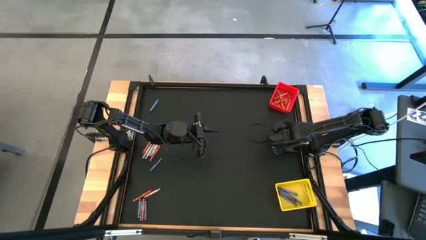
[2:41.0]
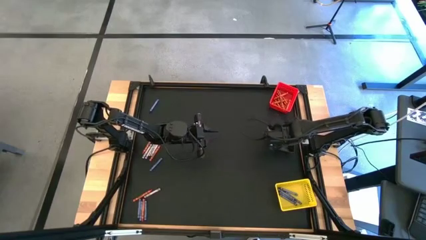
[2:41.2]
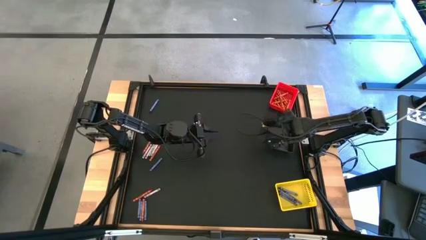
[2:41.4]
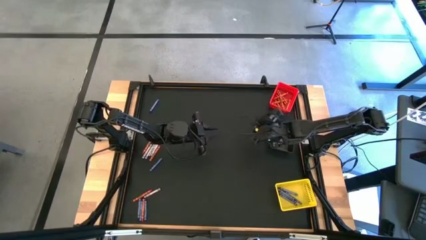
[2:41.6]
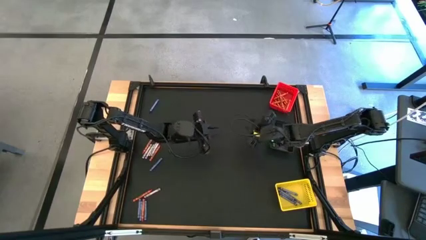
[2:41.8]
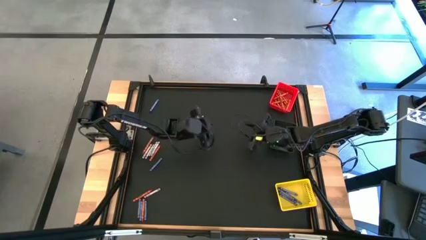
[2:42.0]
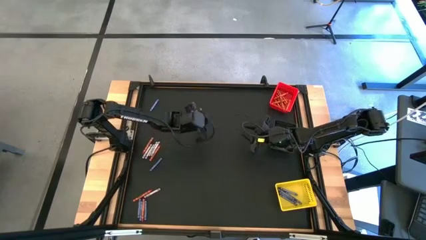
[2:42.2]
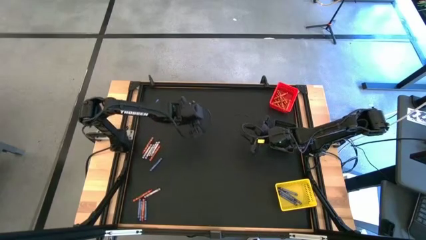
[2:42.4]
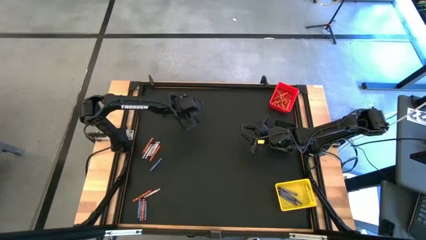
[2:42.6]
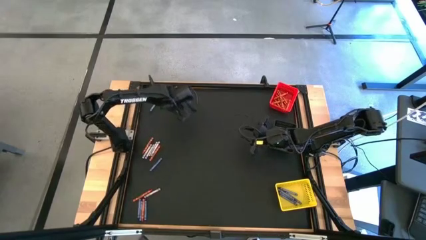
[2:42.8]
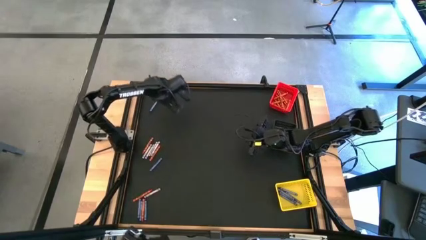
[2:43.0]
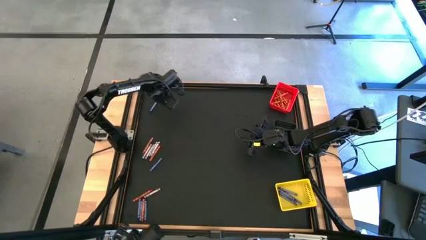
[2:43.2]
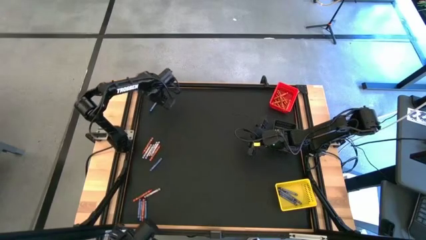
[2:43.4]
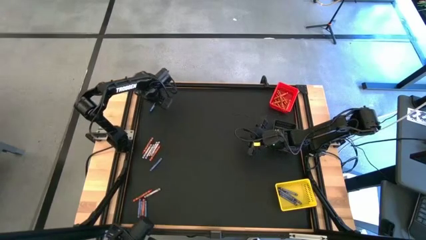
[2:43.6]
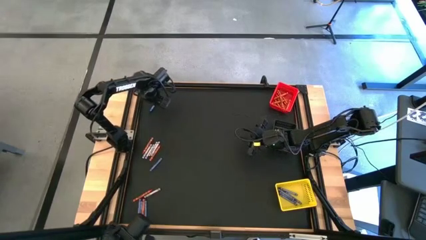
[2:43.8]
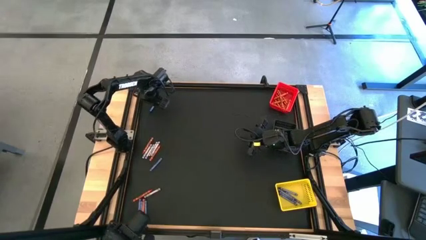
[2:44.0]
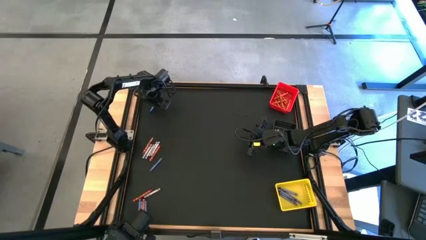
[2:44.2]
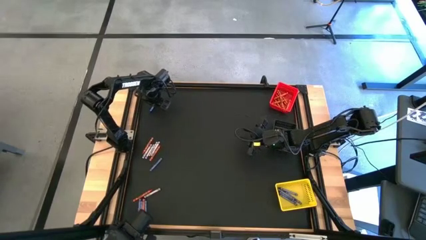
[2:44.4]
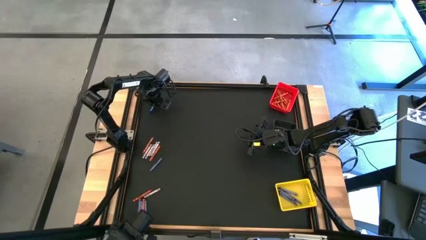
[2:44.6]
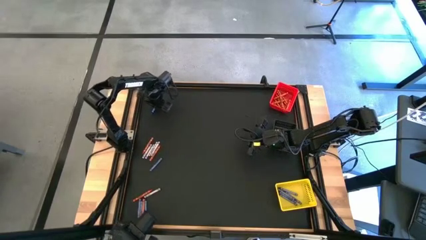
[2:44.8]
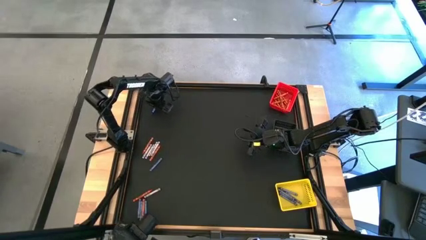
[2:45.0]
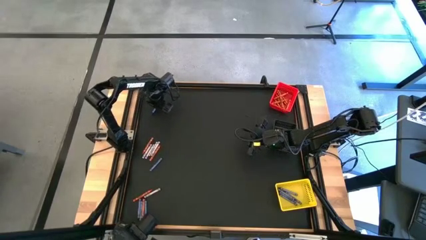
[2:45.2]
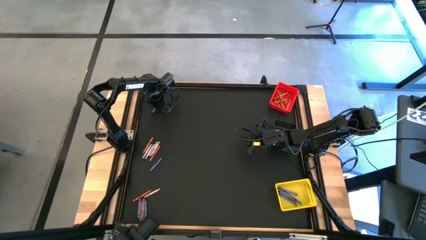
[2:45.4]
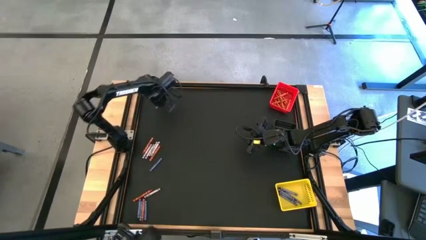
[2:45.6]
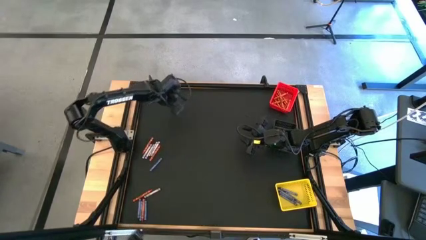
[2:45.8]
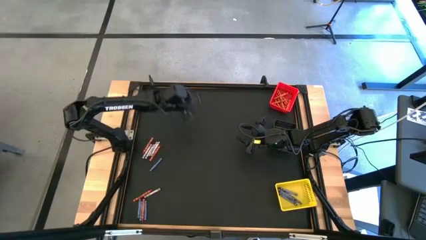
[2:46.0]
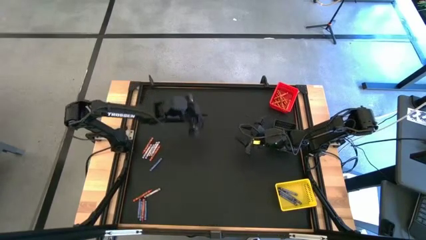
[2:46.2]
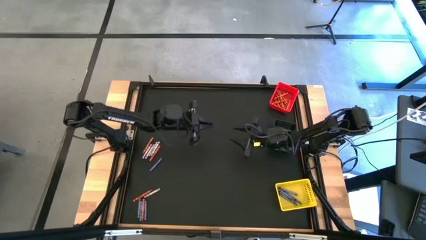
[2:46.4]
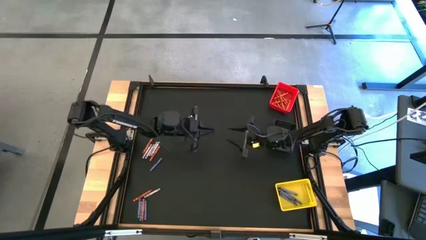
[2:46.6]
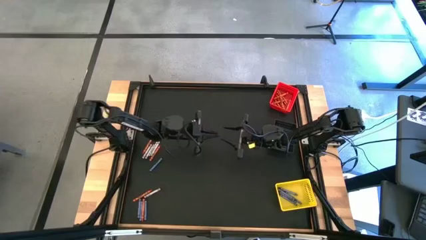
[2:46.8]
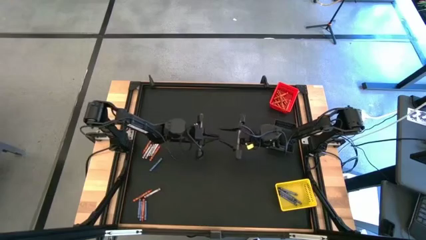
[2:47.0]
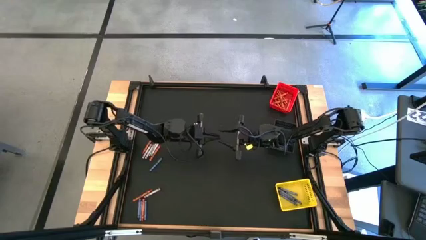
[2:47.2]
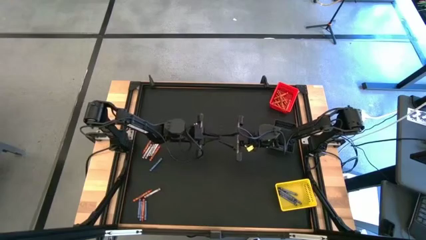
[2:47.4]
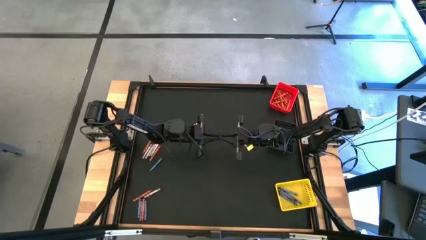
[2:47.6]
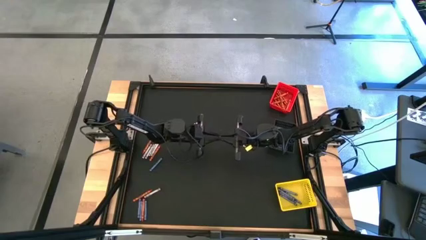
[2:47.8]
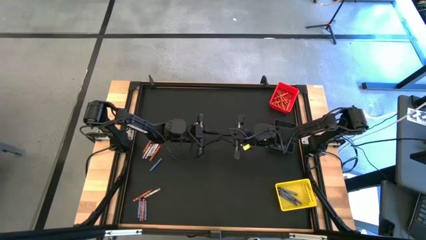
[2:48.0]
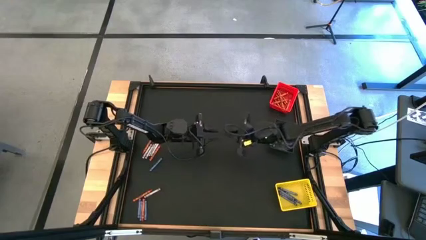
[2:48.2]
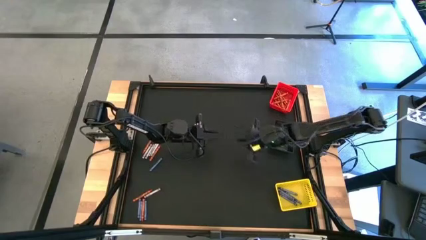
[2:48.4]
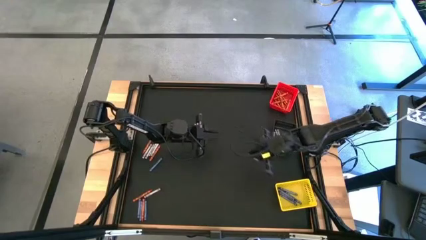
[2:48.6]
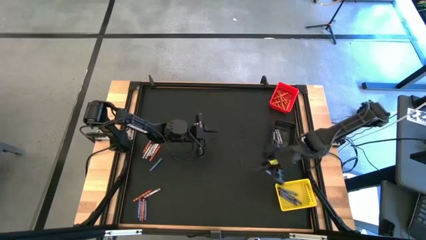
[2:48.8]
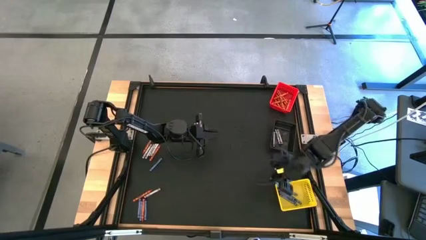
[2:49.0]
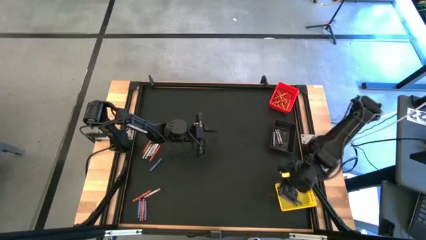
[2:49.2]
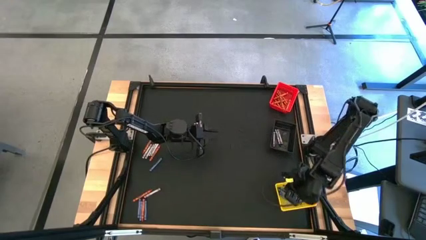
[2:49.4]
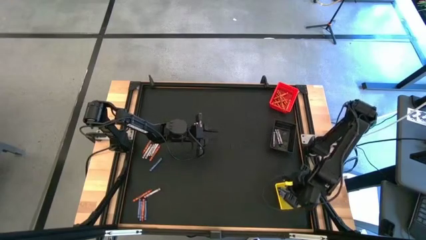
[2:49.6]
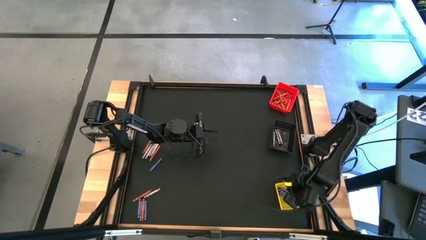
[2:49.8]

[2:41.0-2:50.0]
Task: Sort crayons
Put the blue crayon into the yellow bin

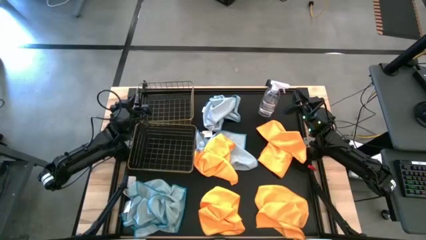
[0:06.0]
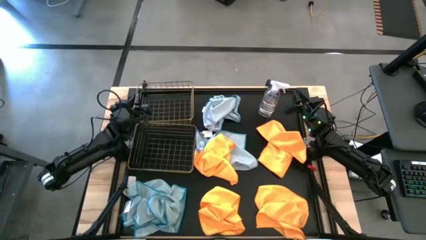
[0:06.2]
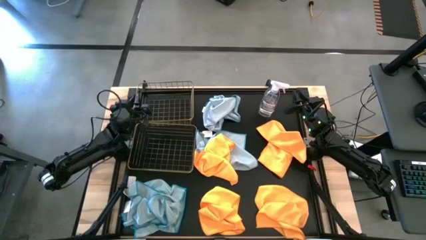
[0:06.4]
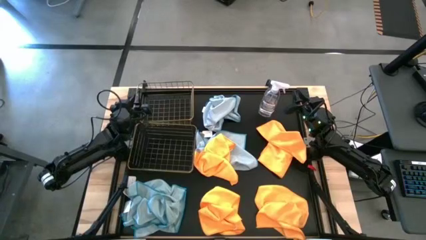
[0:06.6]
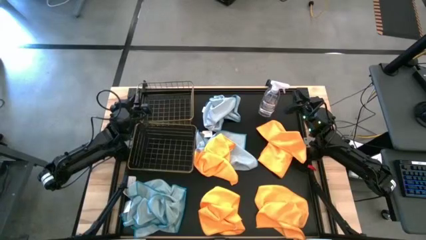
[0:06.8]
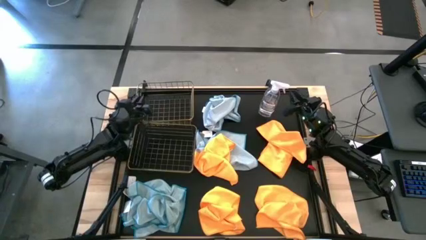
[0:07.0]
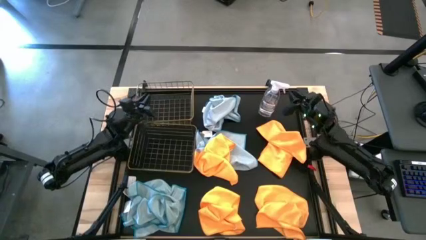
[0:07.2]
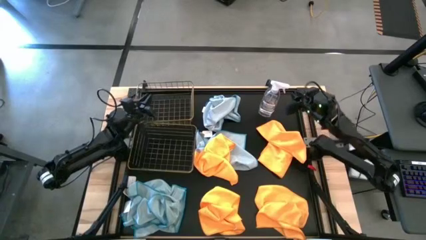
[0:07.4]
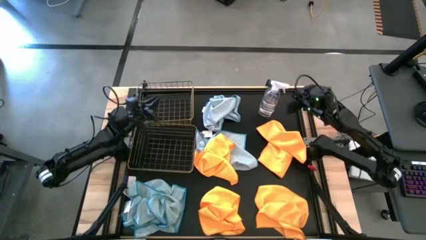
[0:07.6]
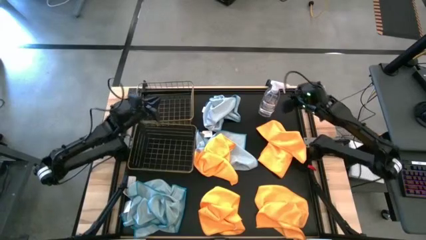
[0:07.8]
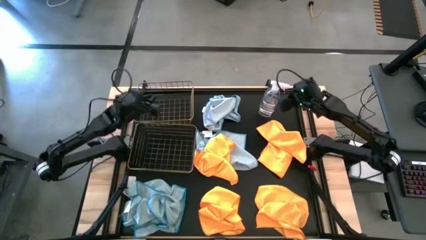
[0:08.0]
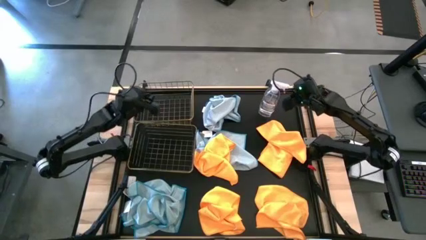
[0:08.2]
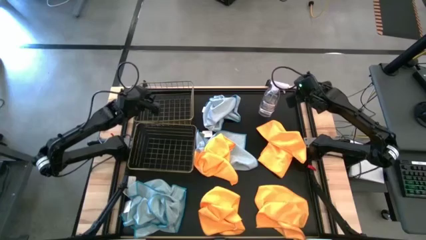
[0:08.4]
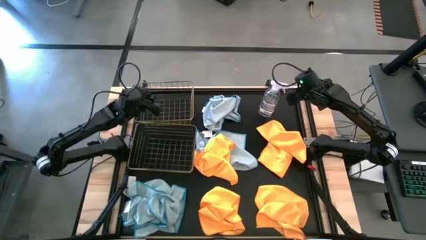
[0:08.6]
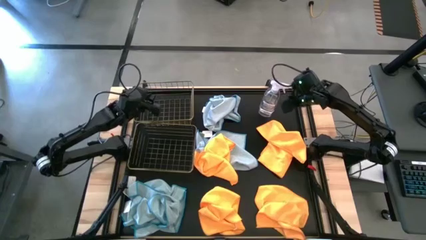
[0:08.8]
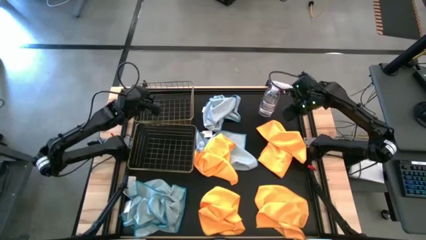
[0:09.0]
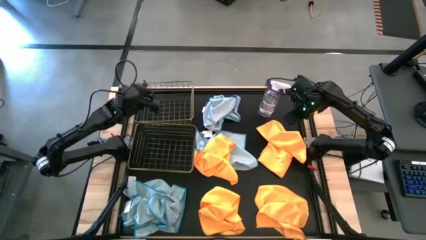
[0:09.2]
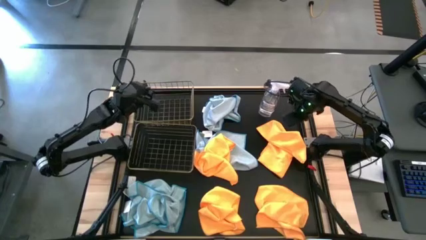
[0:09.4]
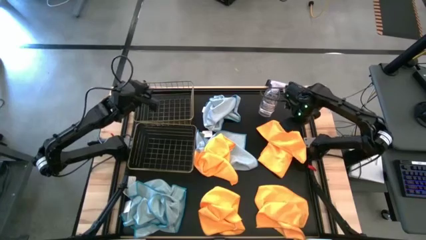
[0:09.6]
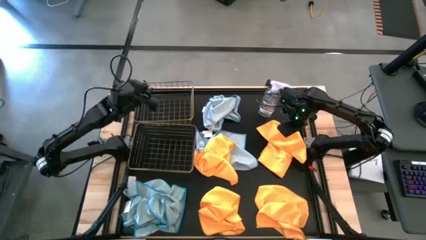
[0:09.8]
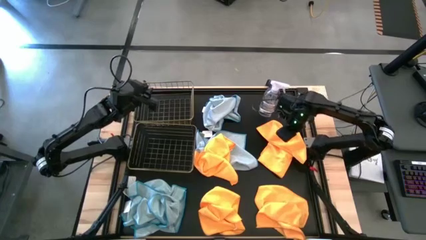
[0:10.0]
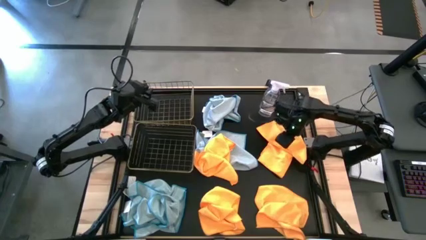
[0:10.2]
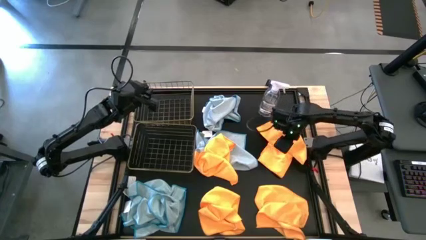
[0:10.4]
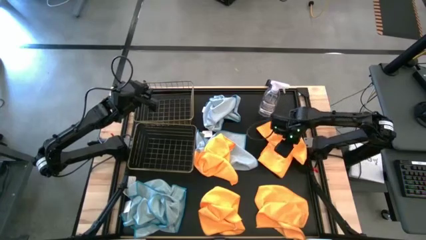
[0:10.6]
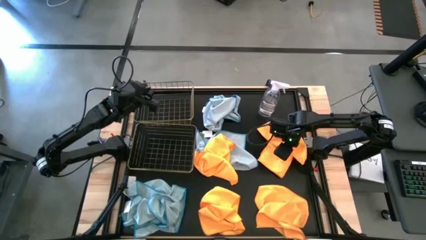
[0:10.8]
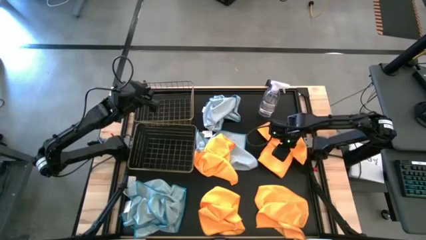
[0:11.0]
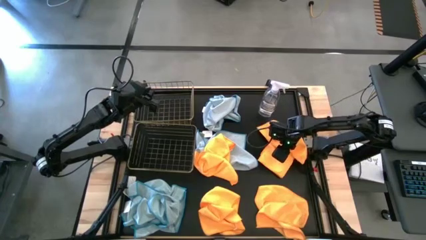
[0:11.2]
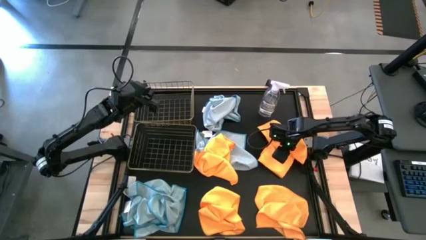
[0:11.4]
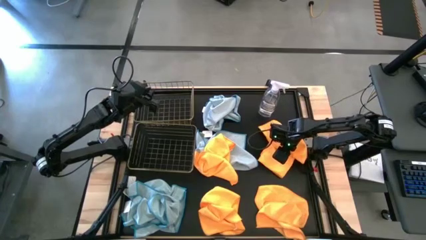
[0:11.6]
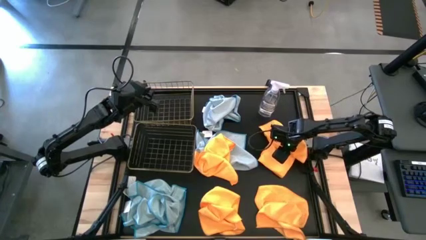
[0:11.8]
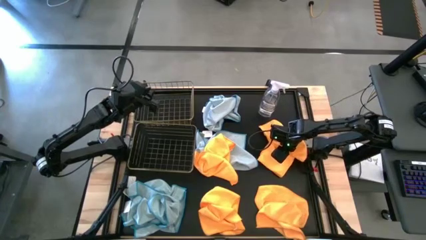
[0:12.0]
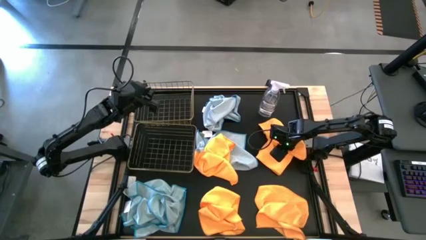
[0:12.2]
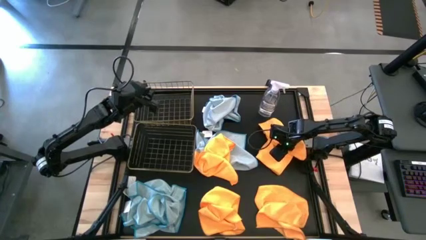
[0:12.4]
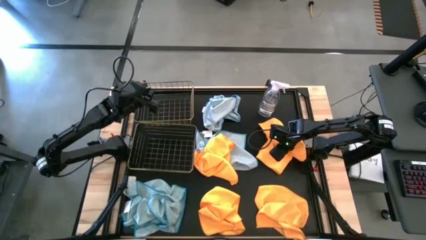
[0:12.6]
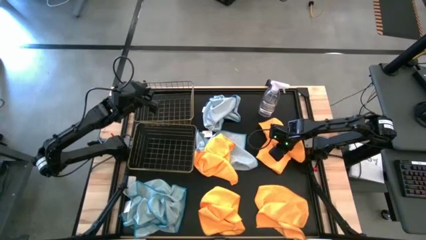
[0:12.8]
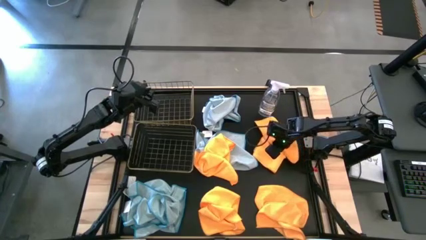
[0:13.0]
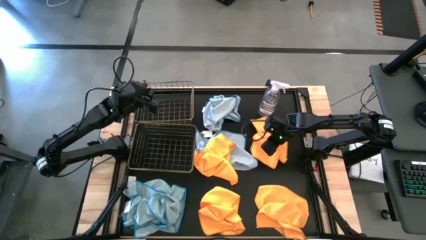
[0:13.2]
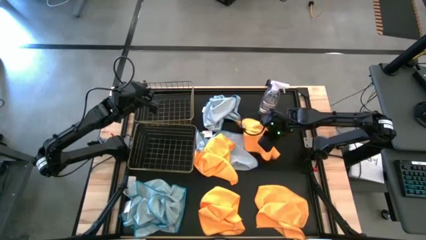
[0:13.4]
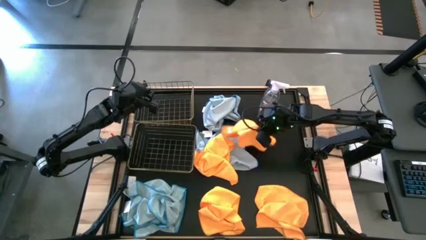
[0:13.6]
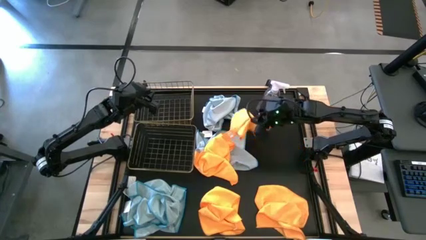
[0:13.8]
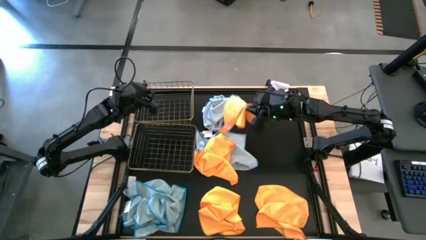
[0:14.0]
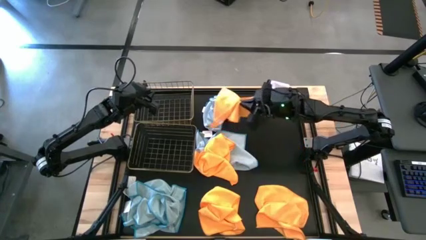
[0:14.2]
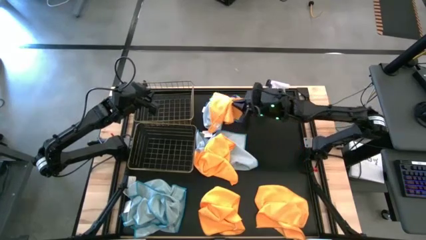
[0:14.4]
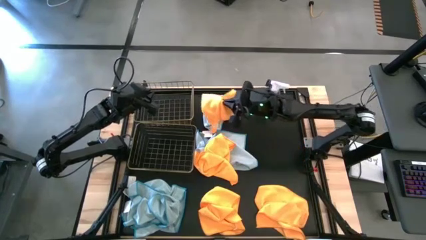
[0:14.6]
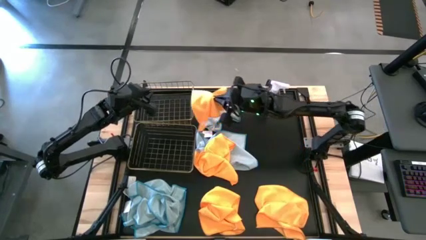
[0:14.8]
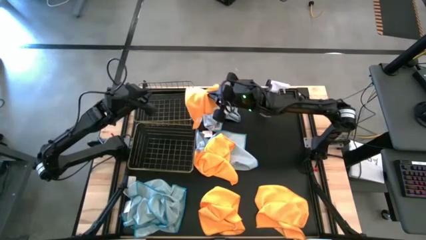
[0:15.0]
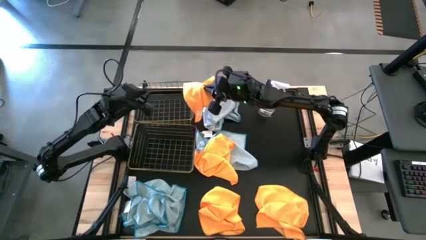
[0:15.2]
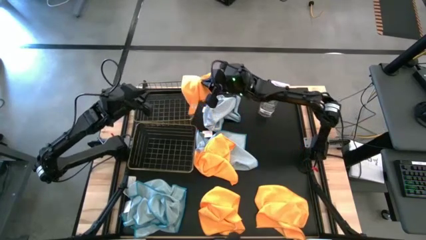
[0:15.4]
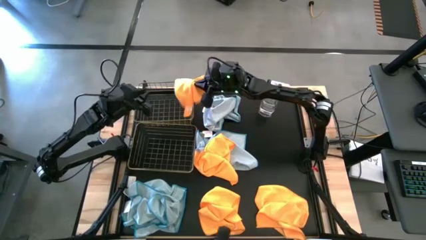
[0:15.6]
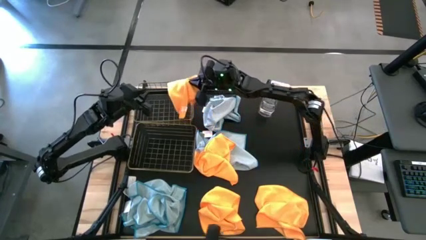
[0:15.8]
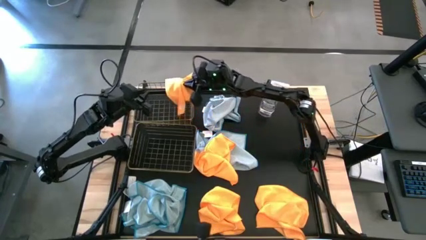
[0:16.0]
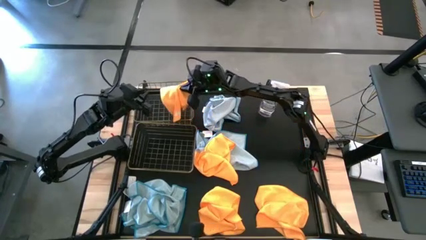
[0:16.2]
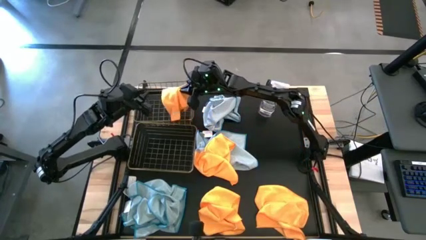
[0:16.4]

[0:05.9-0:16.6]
Task: Sort microfiber towel by color & place in baskets
Put the yellow towel into the top wire basket
